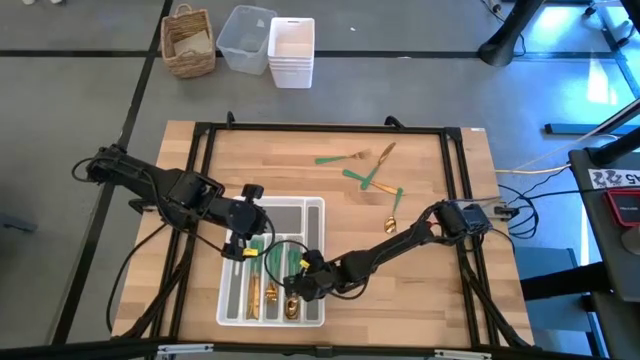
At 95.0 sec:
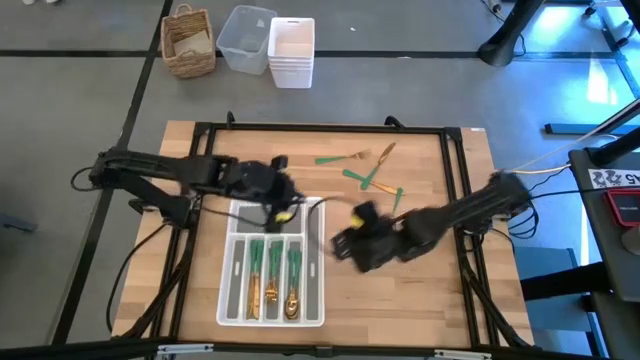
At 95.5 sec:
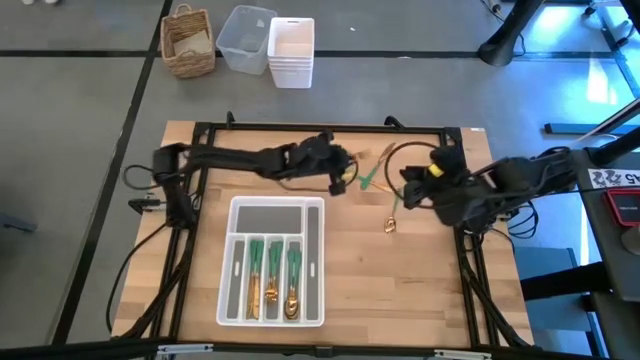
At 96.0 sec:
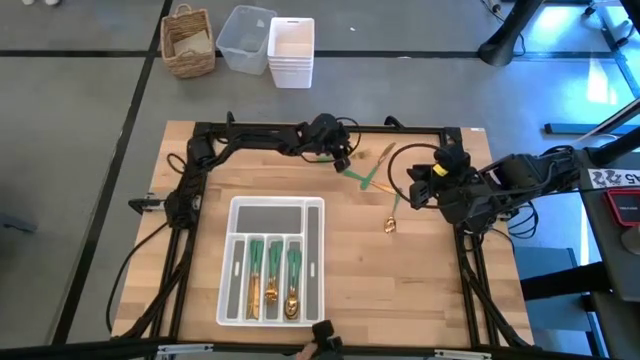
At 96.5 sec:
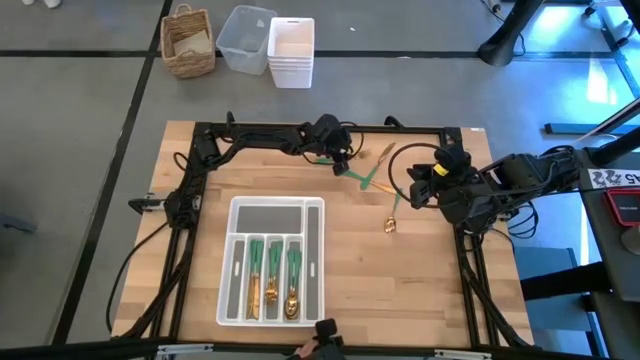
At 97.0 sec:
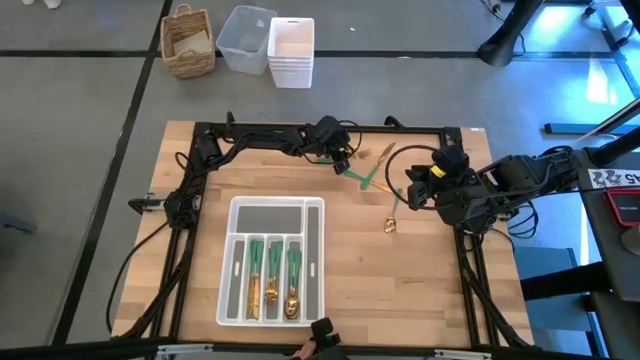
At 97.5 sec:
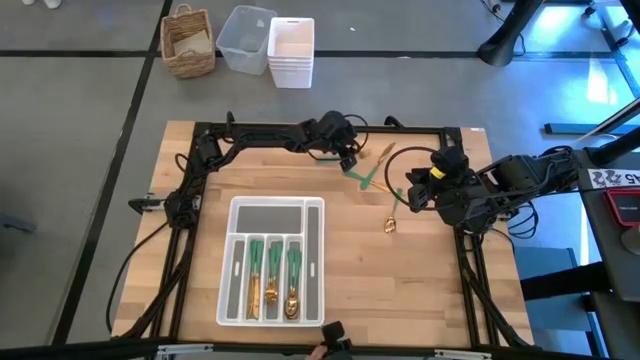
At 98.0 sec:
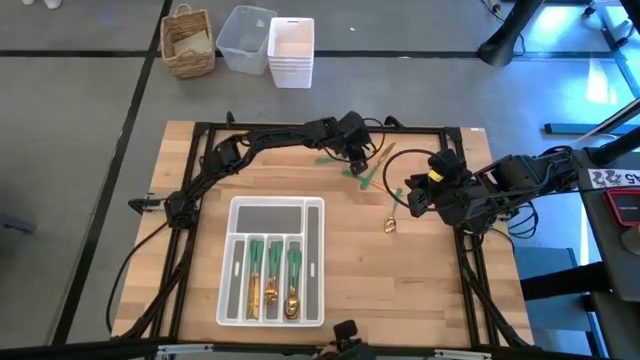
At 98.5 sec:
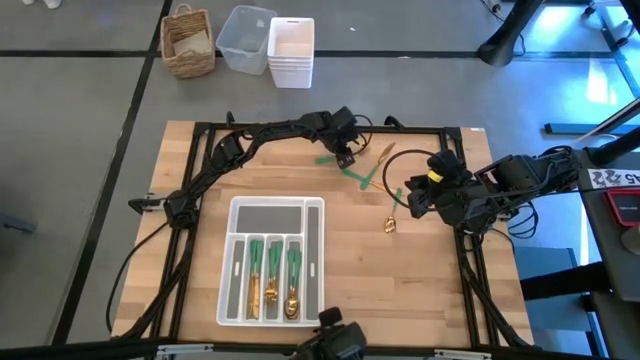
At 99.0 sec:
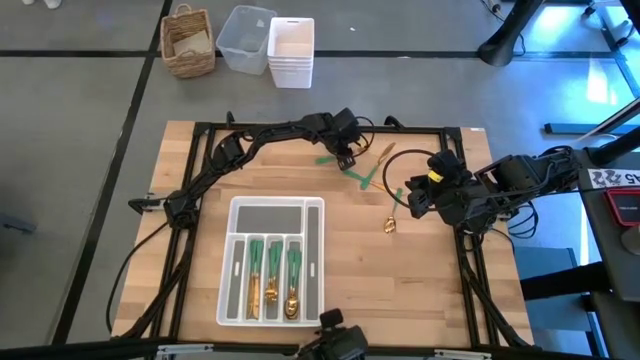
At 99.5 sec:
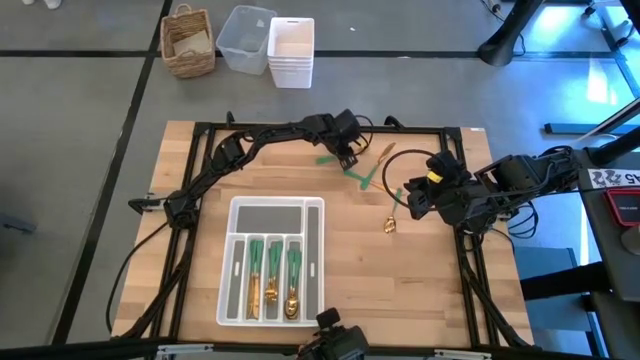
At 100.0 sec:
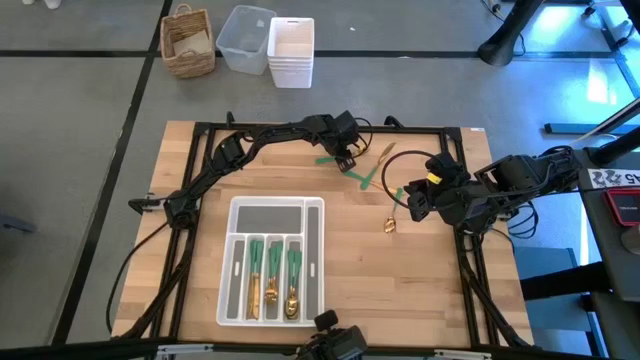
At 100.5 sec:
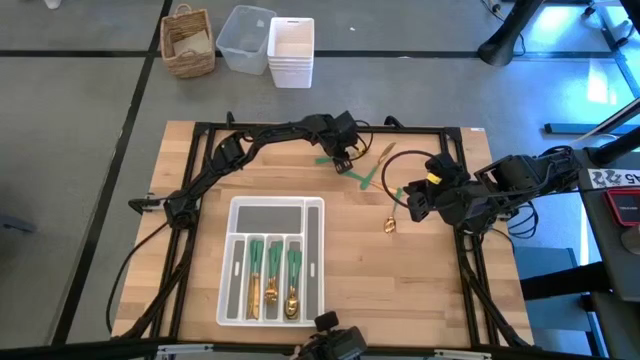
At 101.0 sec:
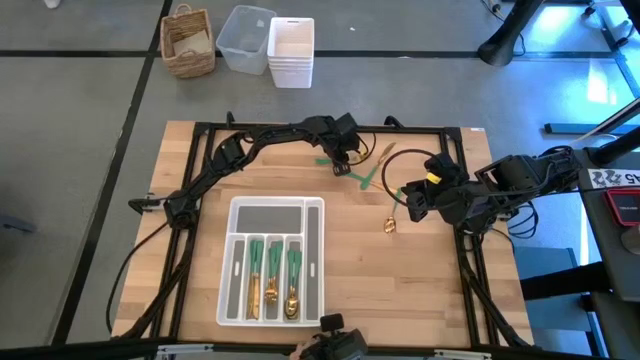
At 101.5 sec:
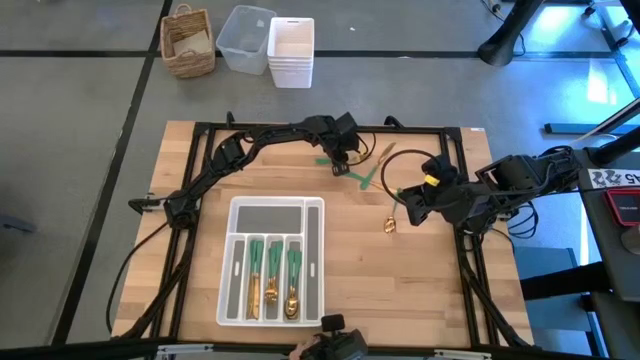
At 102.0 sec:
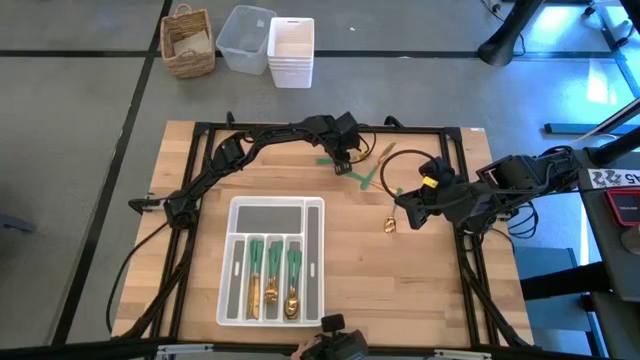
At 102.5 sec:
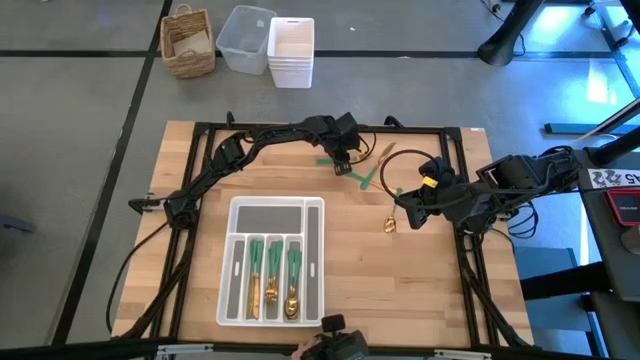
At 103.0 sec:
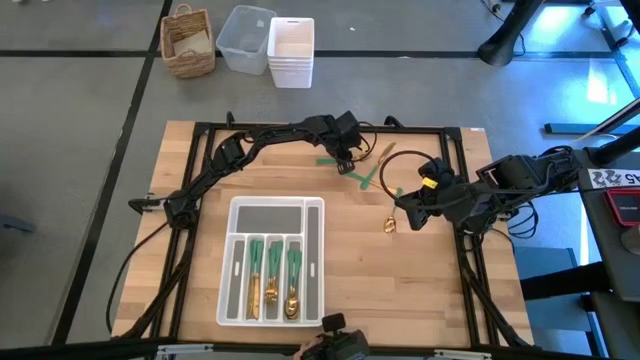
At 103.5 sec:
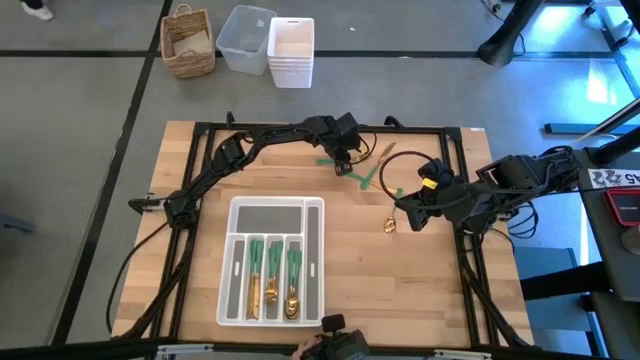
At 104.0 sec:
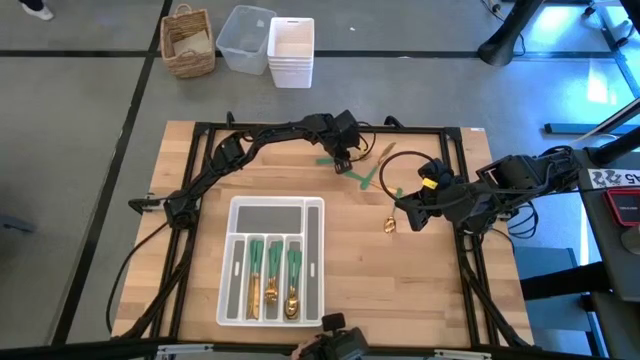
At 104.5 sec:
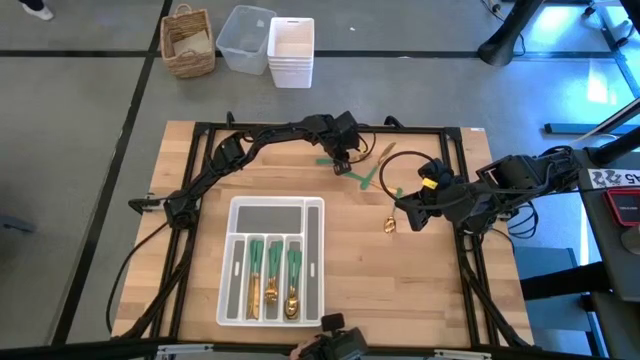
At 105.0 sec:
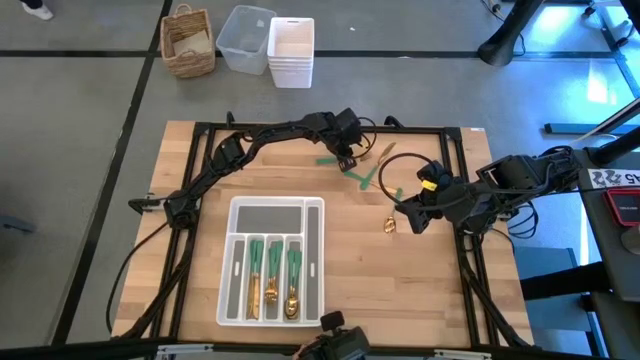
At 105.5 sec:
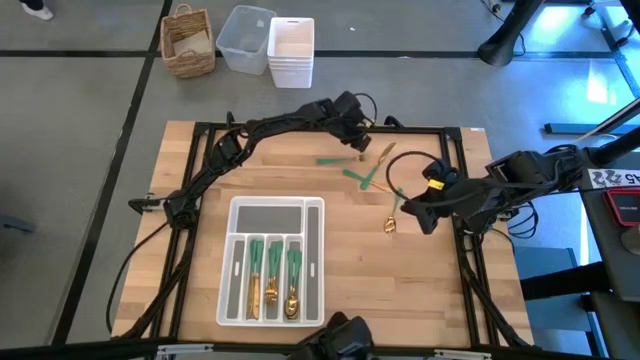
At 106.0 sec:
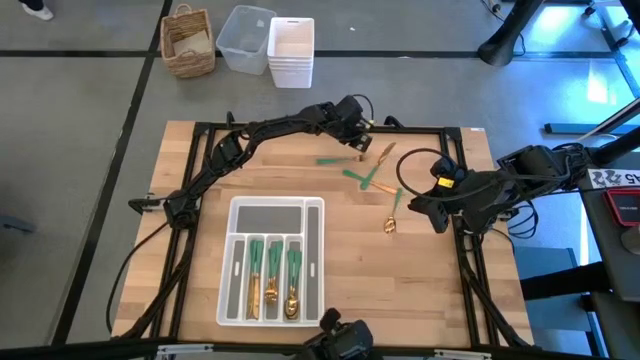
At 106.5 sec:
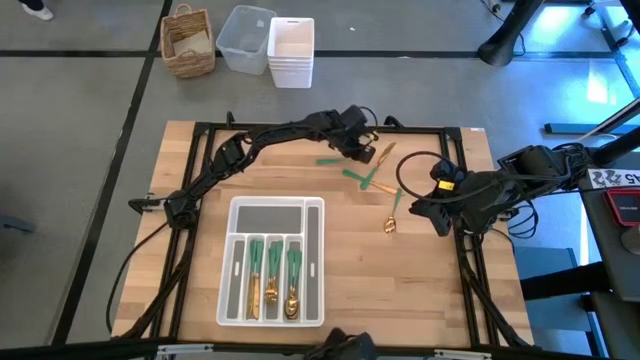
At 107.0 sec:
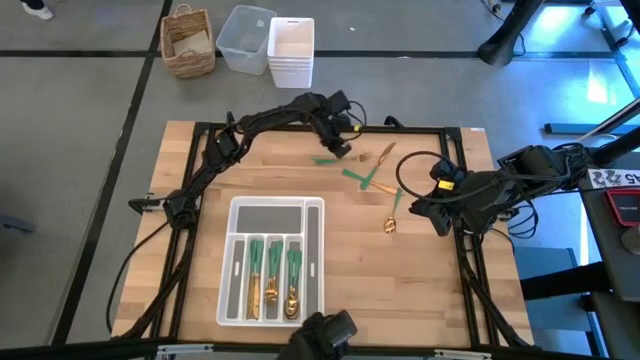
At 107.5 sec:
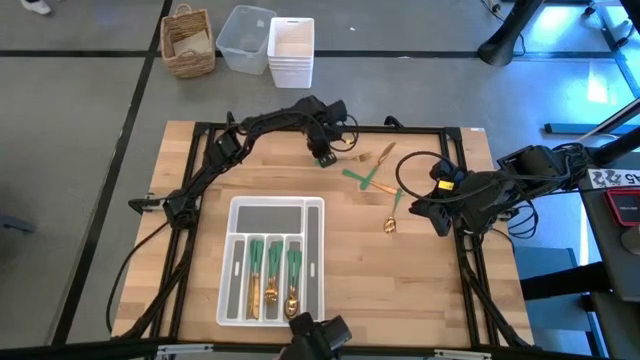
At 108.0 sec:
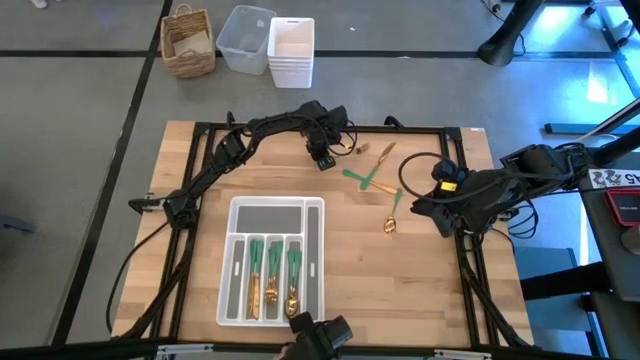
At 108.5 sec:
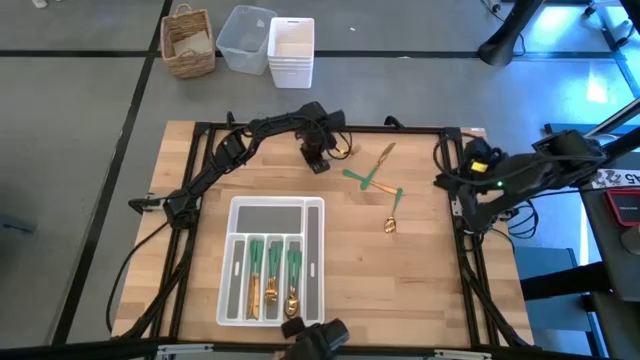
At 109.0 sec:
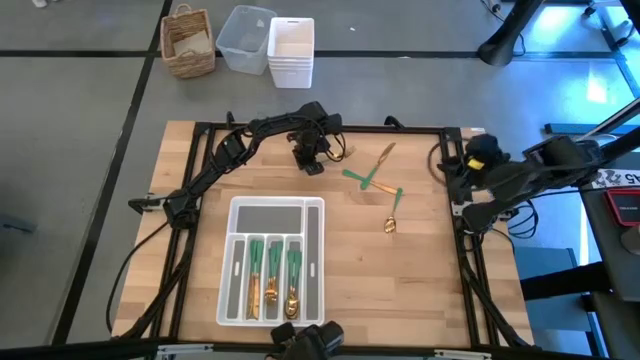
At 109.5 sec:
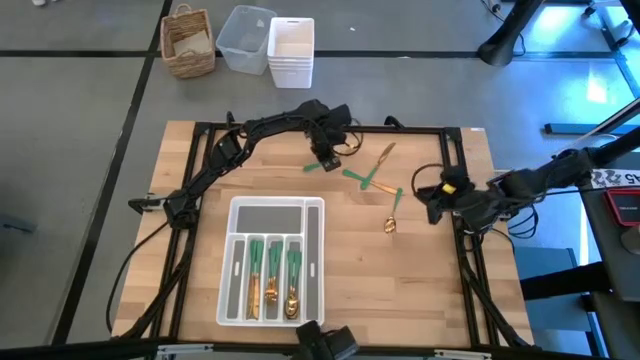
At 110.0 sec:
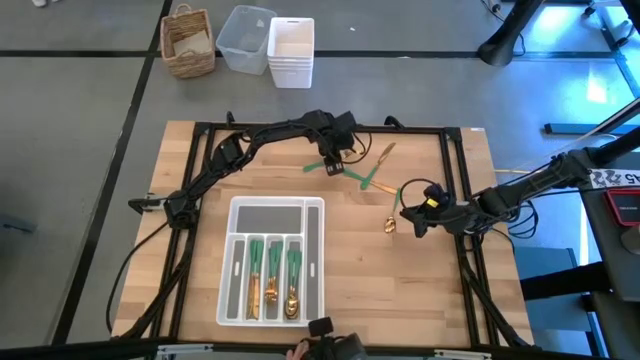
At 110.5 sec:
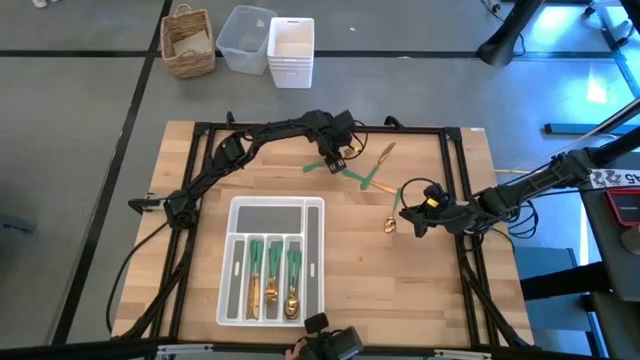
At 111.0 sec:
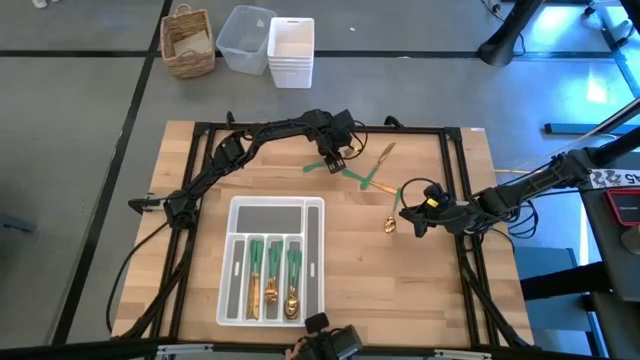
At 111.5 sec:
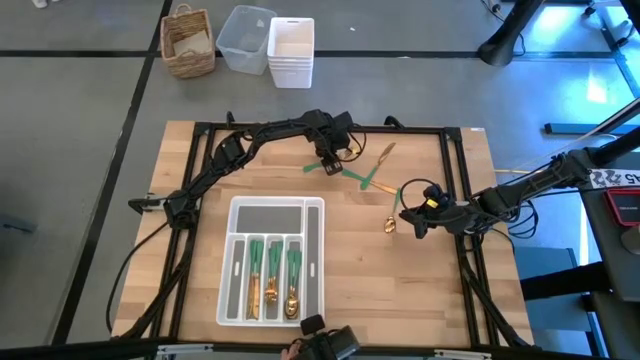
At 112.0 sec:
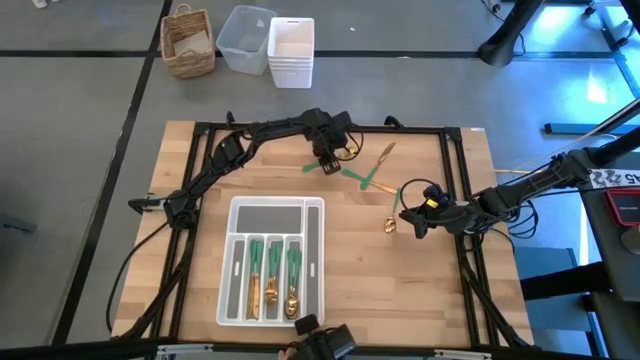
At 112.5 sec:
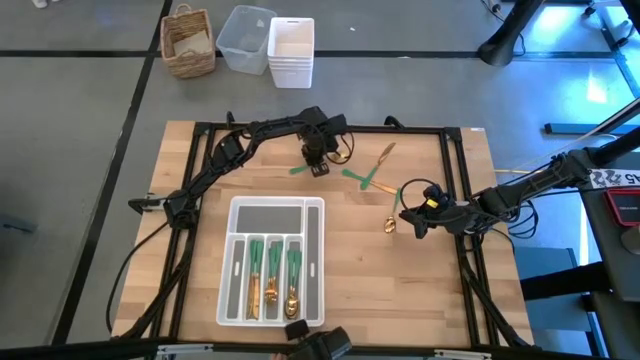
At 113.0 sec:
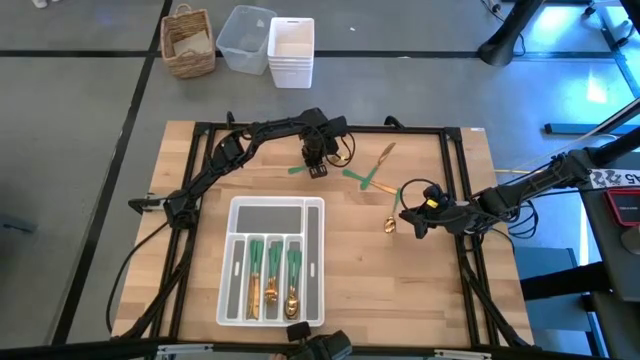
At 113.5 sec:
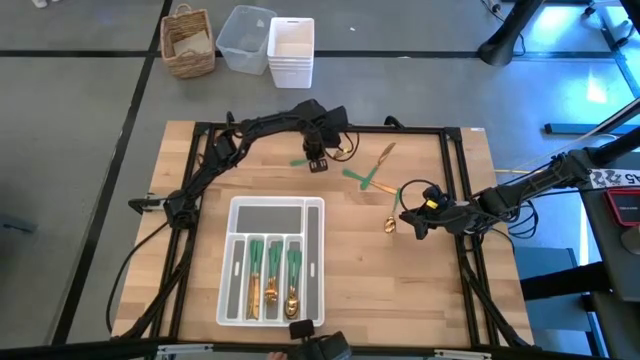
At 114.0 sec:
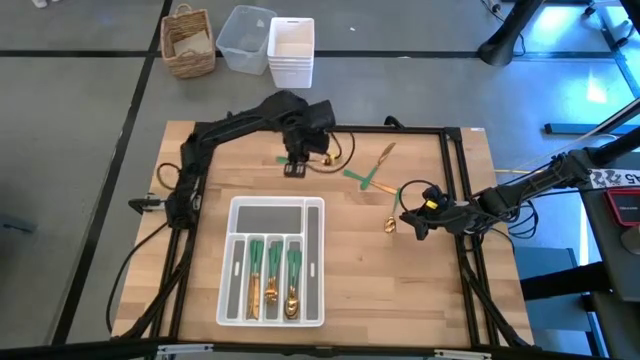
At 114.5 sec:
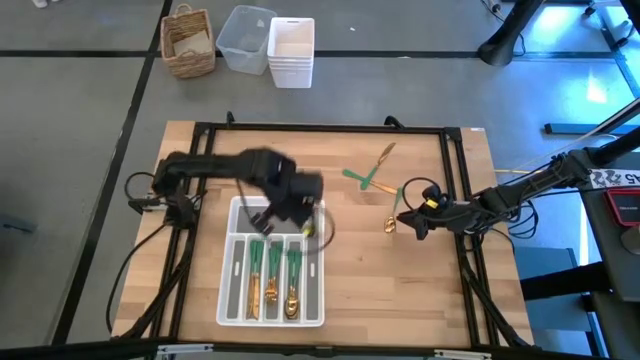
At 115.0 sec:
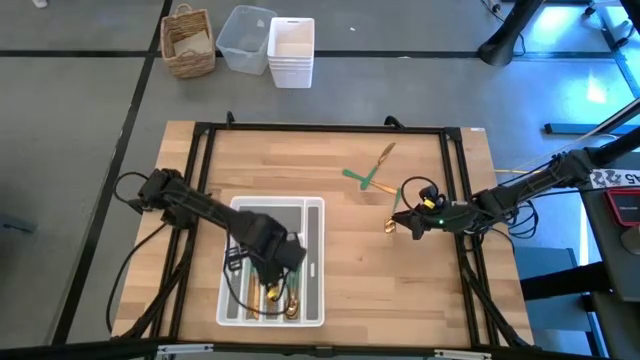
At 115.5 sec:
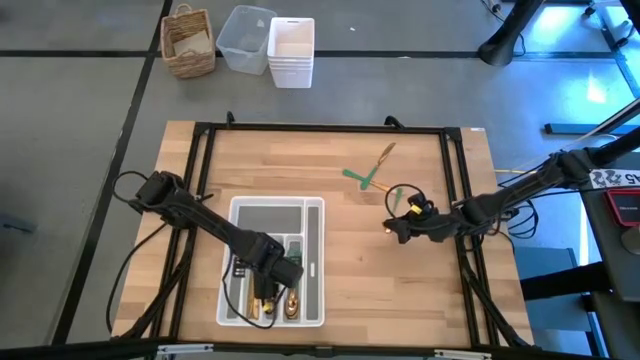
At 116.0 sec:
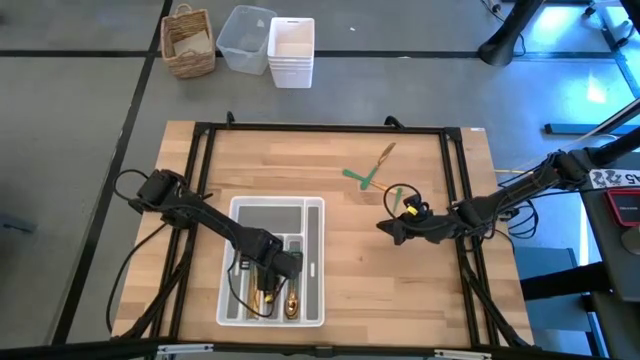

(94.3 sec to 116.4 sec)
Task: Sort silverware
Put the fork in the silverware tray
